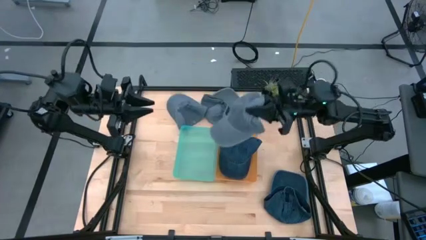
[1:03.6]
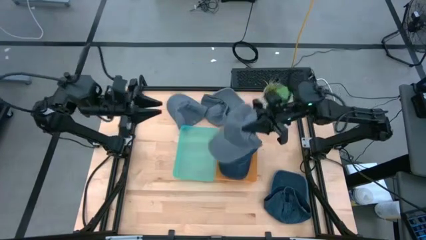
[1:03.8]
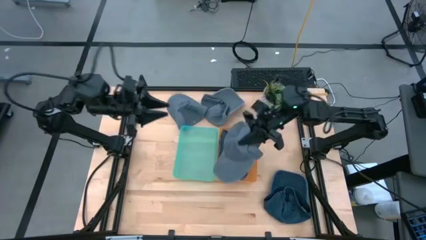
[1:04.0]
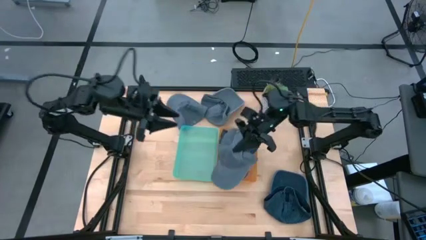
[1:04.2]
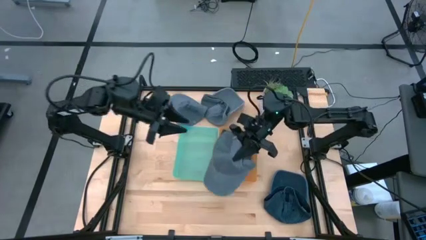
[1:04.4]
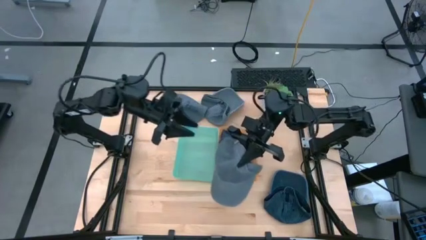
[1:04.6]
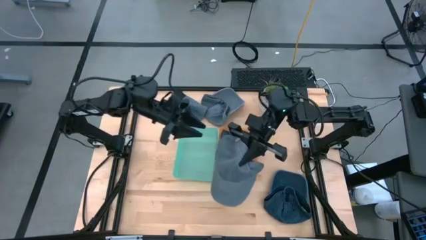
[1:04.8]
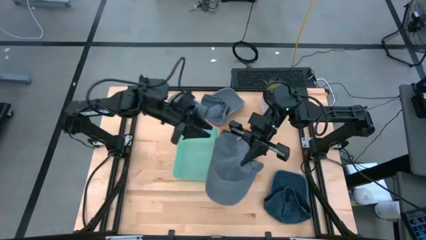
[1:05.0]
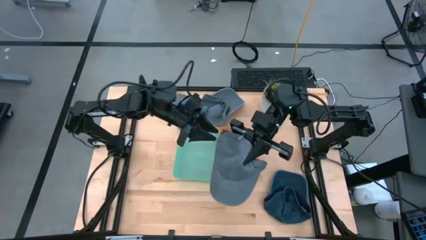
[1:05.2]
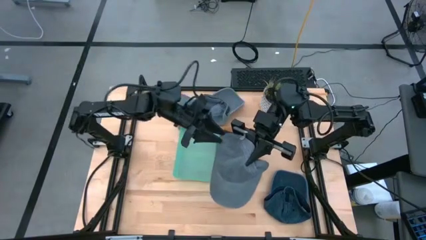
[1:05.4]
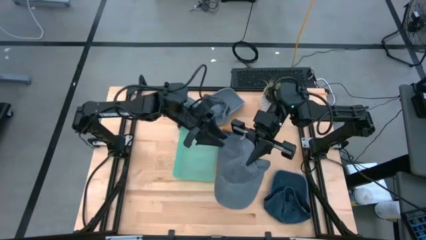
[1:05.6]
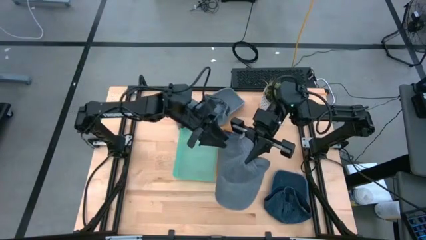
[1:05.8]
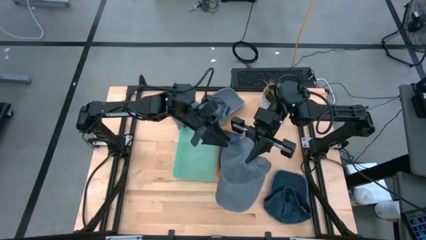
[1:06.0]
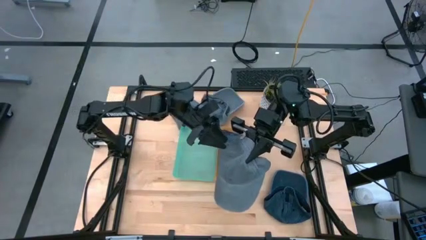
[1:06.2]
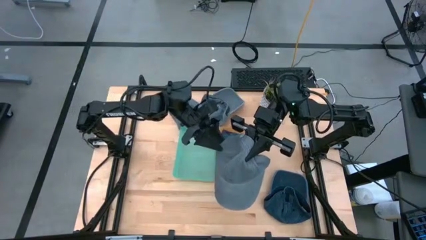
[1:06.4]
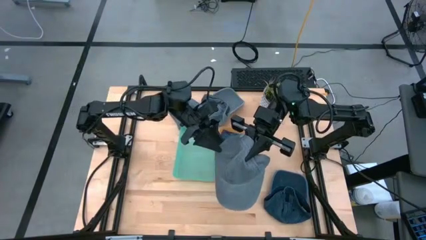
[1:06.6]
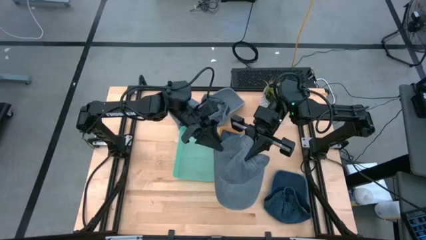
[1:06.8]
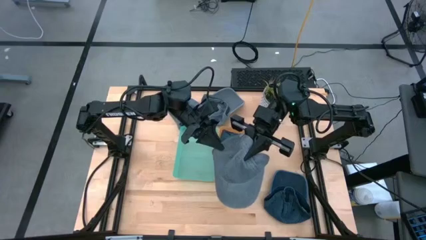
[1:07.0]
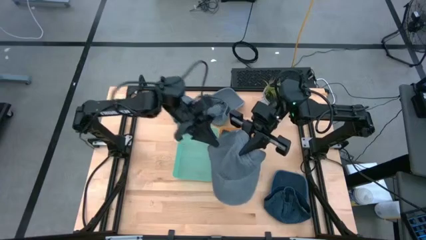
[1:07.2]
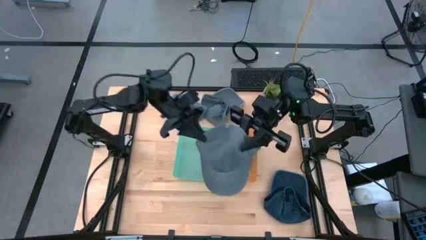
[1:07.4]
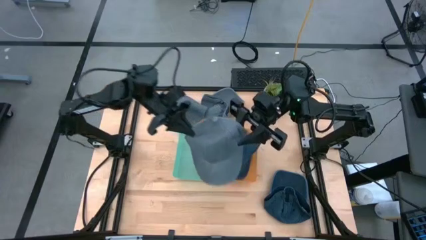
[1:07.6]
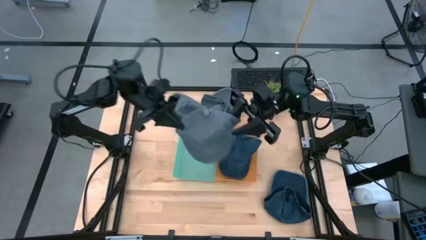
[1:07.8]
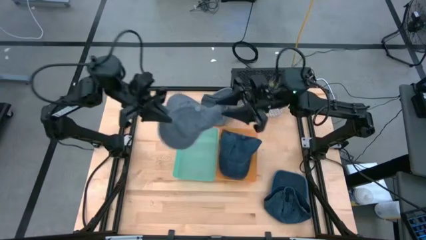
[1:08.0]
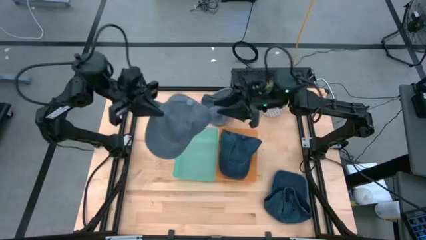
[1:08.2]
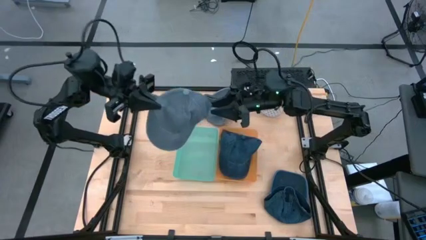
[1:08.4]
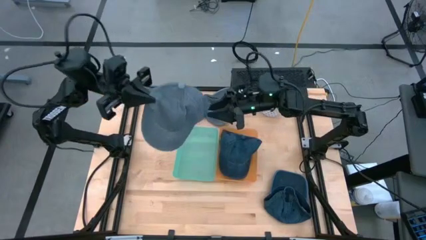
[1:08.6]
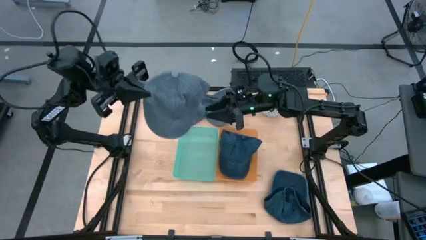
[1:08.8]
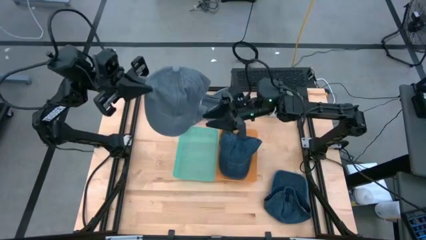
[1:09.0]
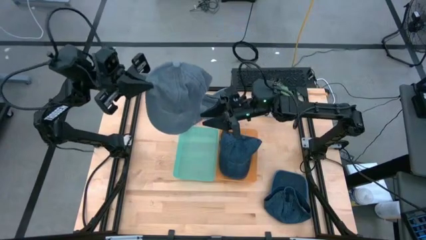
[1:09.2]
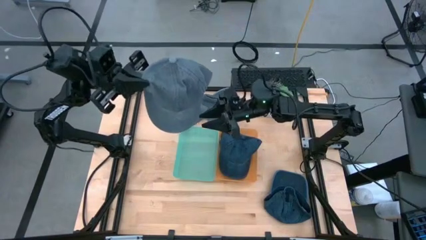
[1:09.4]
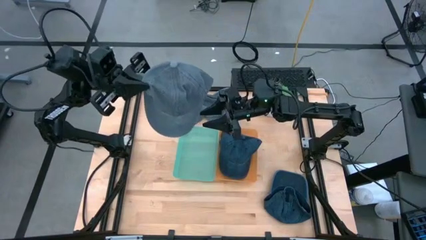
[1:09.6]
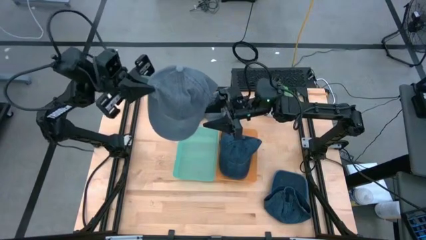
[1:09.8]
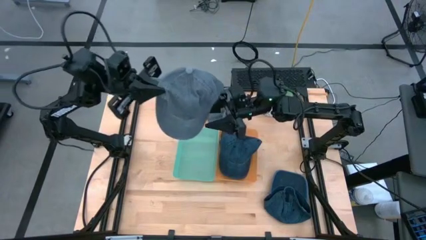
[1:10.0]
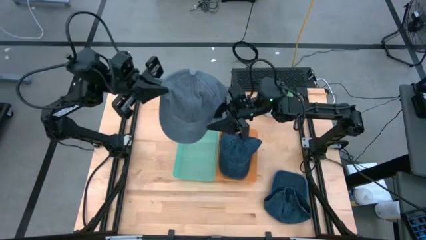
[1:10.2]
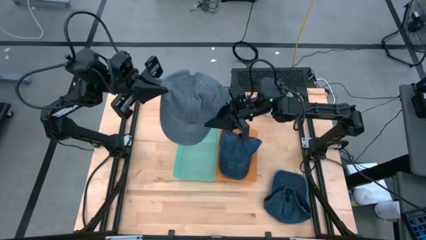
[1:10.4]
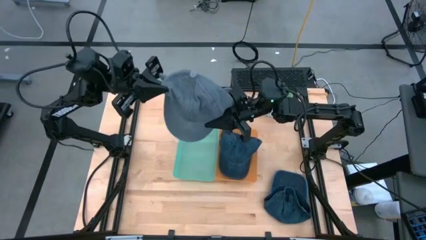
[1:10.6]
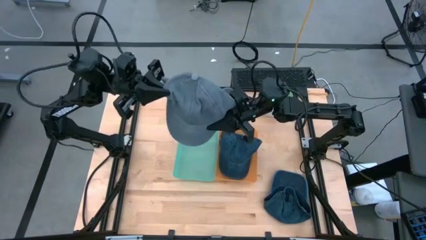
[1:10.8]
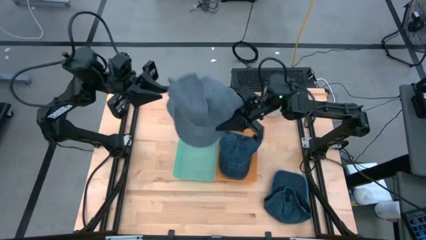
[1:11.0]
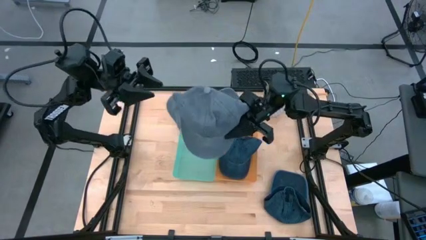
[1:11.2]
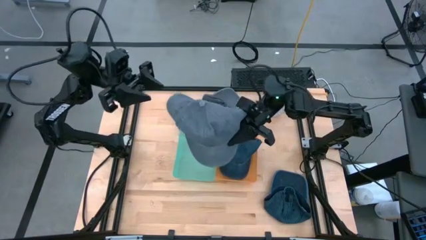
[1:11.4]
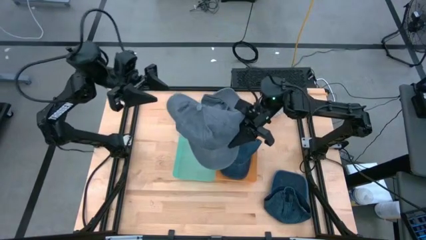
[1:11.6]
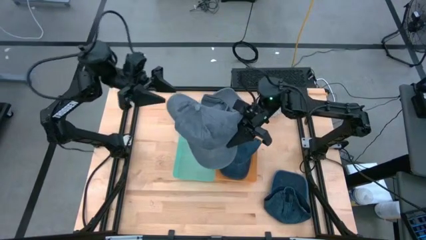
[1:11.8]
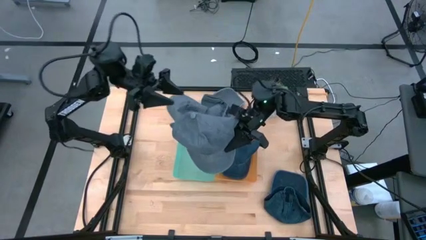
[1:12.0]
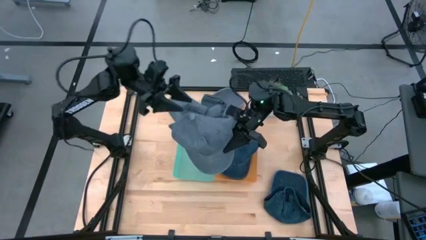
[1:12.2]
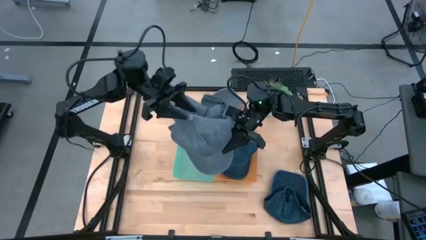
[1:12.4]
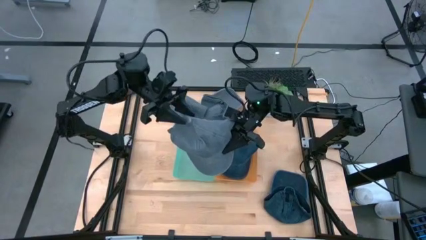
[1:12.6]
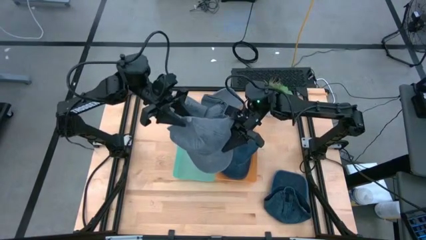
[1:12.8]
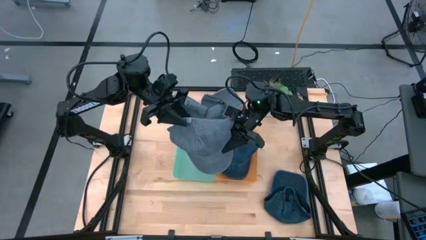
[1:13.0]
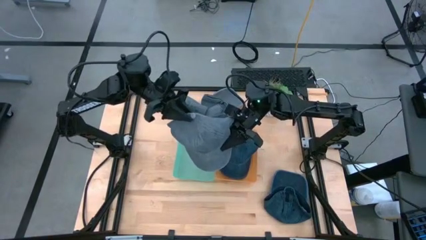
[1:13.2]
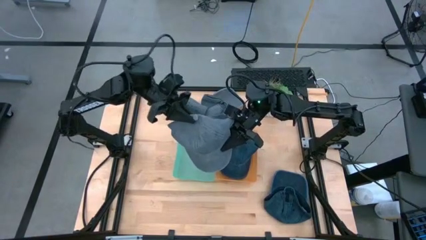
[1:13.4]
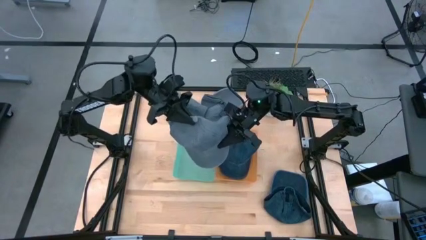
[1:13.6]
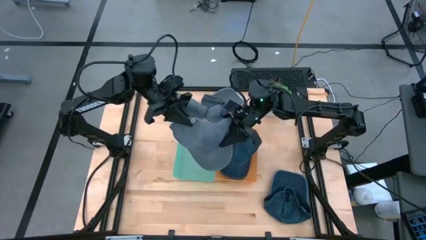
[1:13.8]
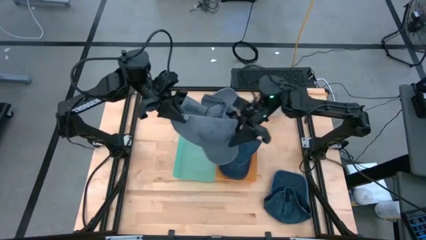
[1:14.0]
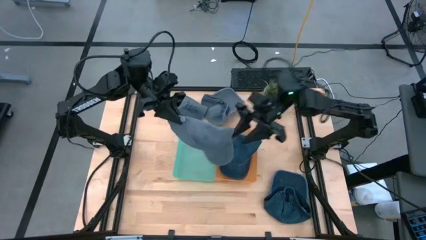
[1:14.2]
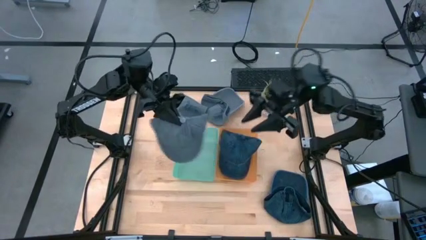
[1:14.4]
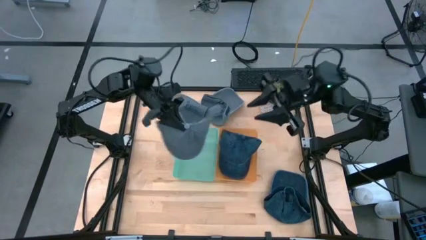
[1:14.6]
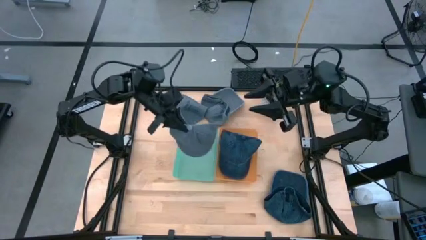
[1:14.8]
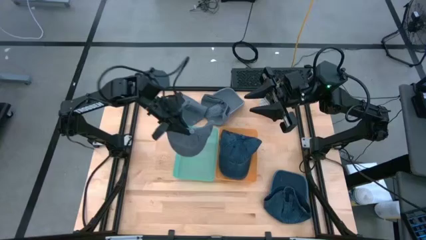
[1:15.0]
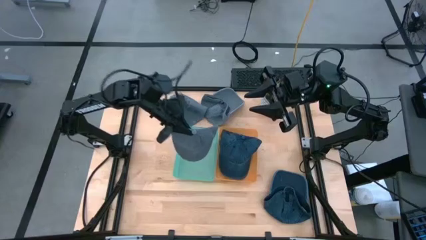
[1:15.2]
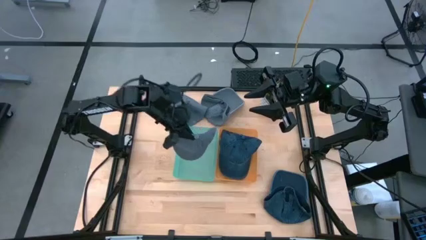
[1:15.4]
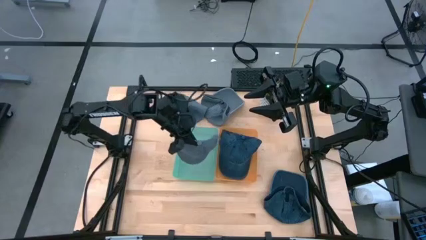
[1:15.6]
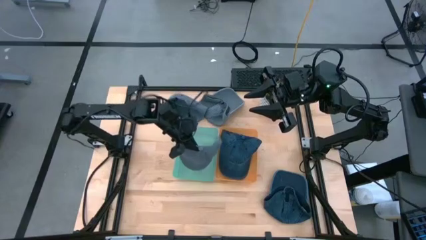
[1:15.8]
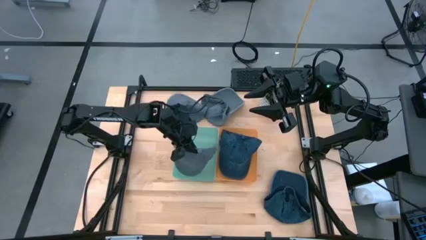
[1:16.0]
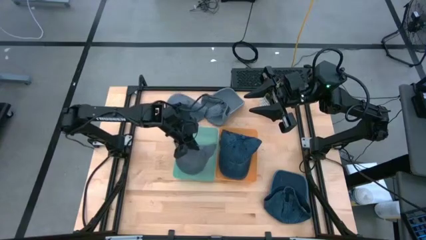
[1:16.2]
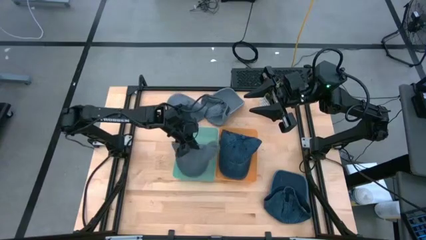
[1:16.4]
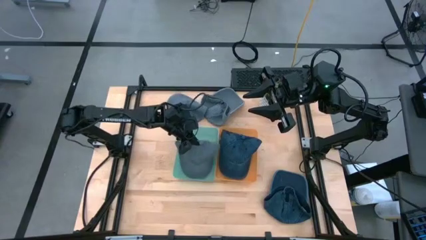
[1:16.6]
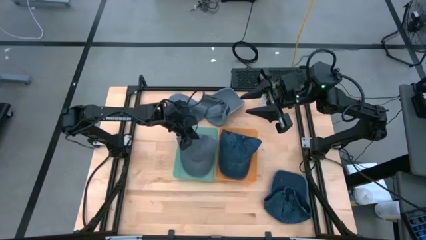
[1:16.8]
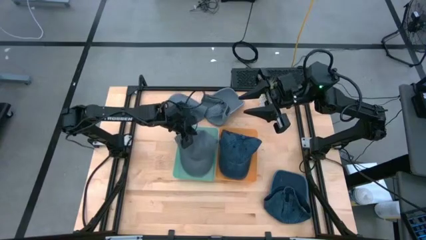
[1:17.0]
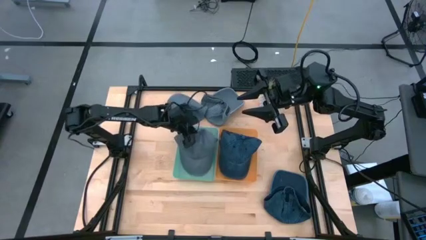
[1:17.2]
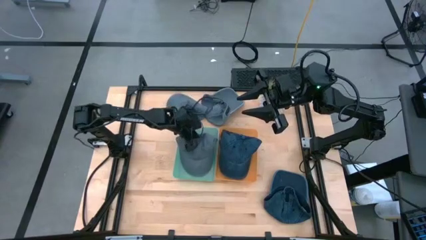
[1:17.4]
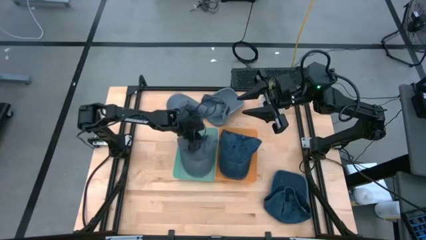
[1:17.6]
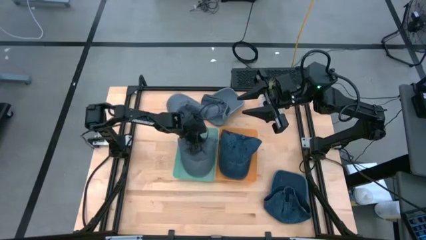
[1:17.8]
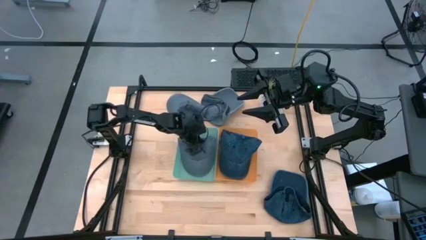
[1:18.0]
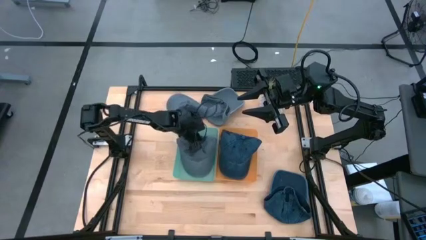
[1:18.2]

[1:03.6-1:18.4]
Task: Pick & Place hat
Put the bottom gray cap into the blue bin

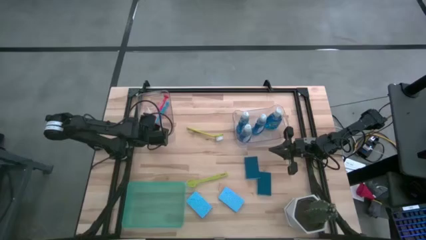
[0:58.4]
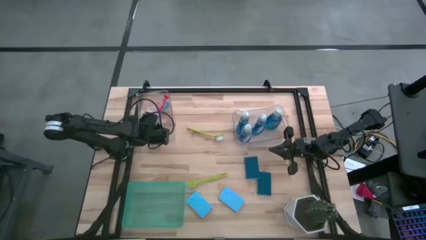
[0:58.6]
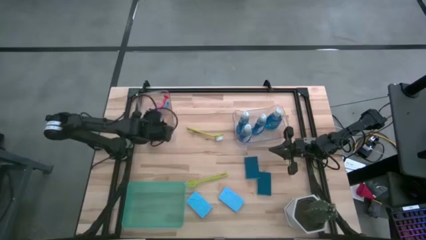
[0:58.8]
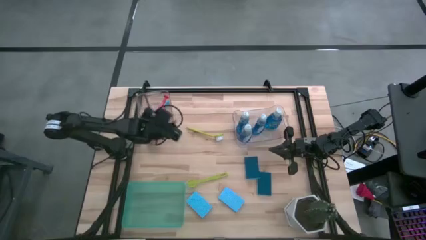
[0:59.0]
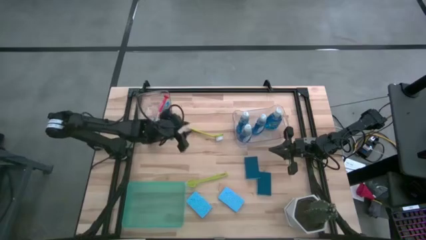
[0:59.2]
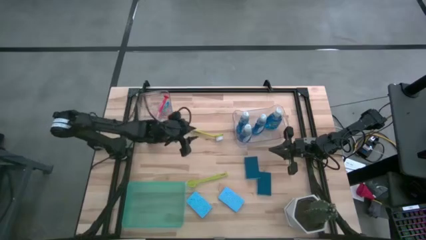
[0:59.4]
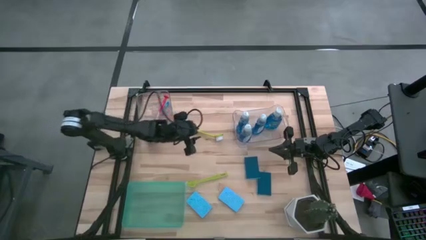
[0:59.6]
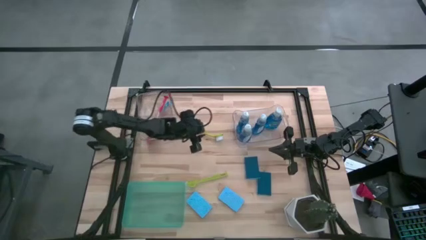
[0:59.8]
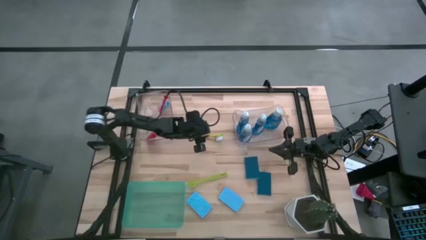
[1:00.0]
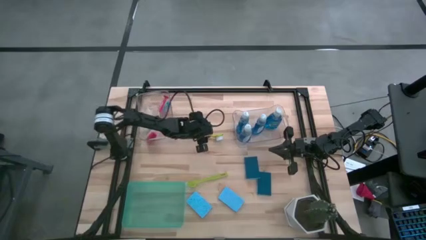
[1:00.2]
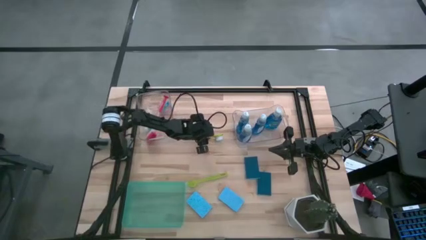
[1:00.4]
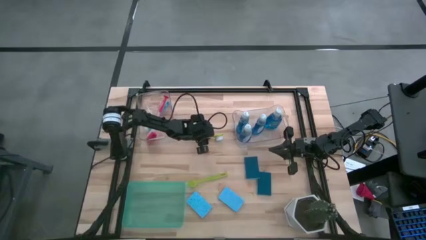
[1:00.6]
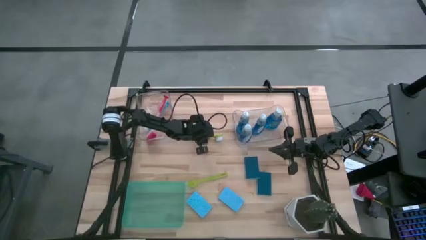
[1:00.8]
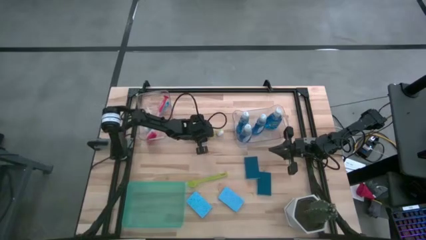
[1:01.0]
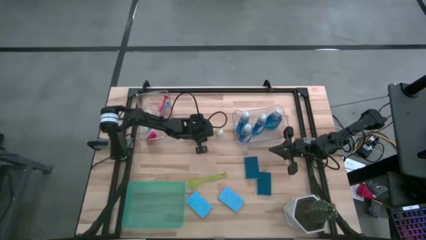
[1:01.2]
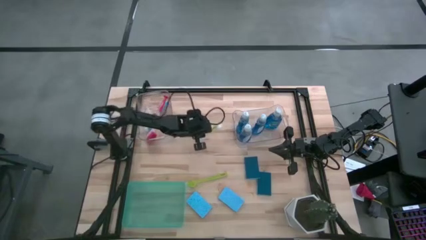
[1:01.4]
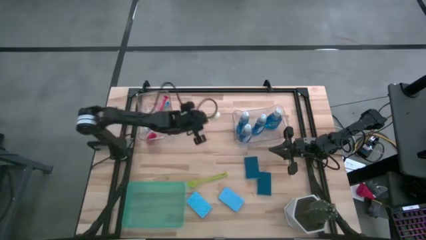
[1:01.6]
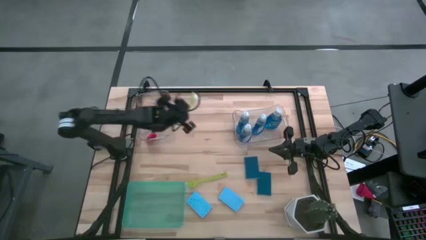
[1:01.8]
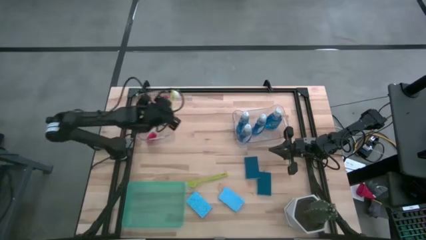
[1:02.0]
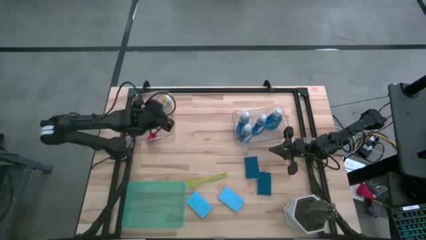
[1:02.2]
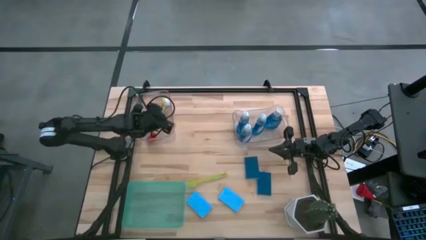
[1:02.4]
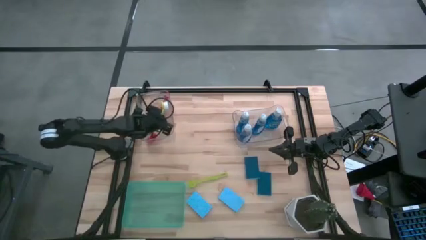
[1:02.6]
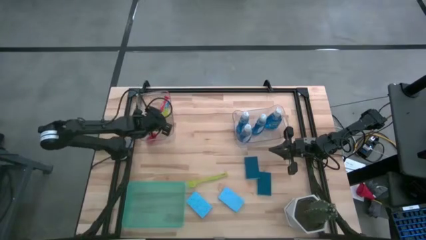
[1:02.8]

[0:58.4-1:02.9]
Task: Pick & Place Kitchen Sink Supplies
Put the light green dish brush into the left transparent bin
